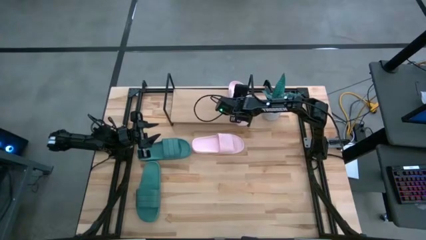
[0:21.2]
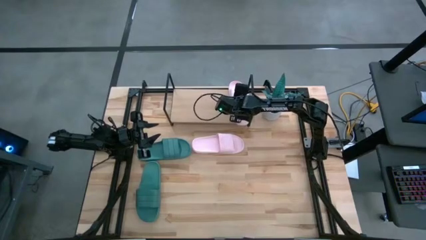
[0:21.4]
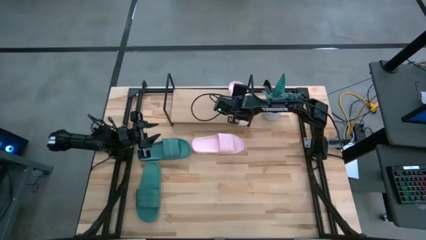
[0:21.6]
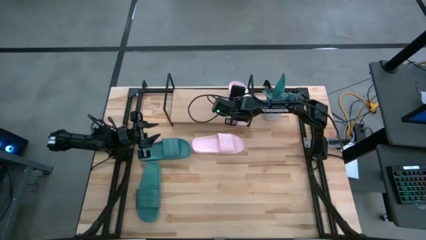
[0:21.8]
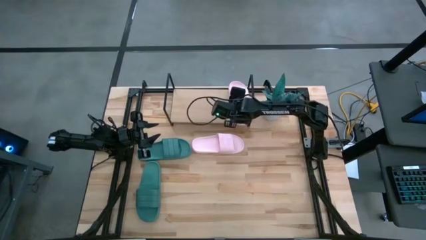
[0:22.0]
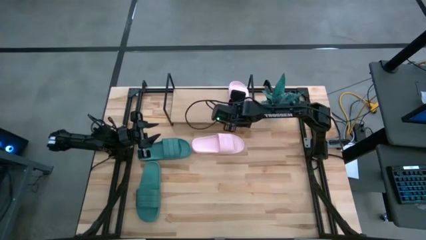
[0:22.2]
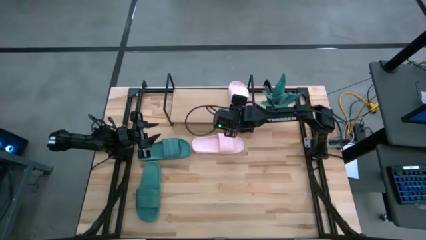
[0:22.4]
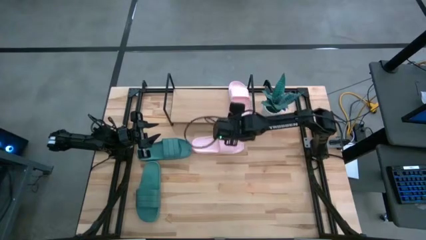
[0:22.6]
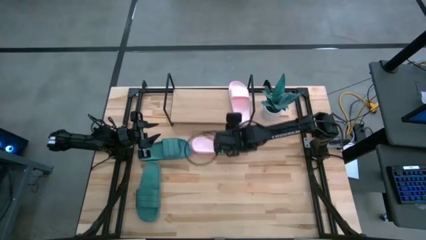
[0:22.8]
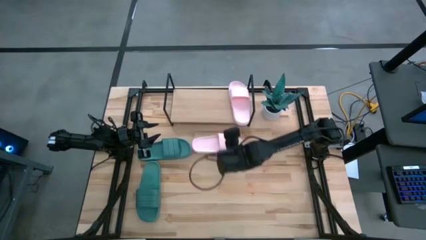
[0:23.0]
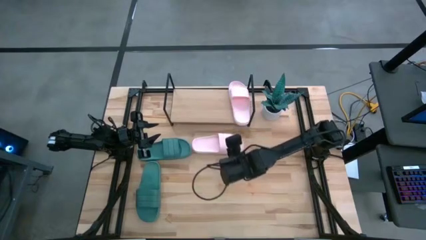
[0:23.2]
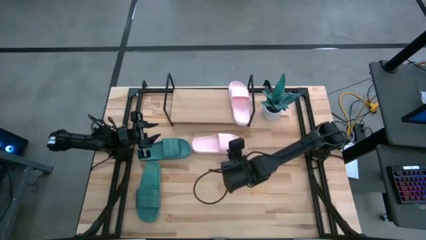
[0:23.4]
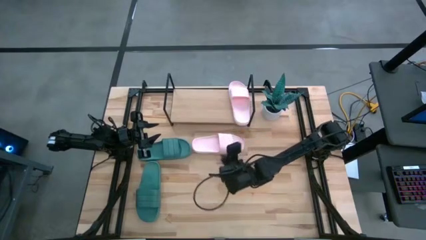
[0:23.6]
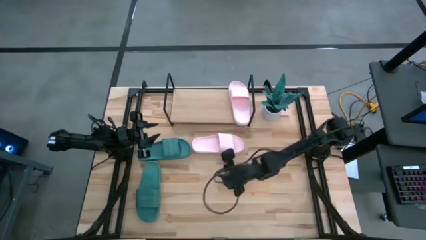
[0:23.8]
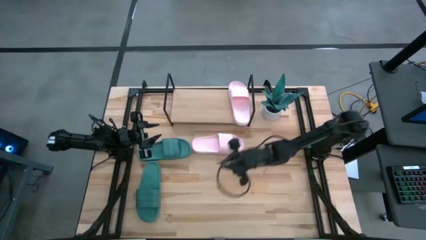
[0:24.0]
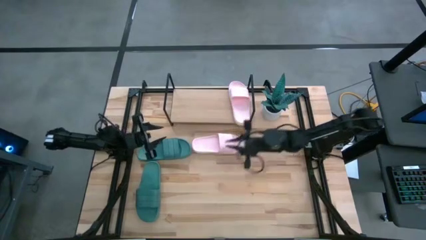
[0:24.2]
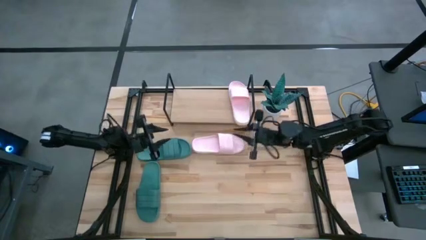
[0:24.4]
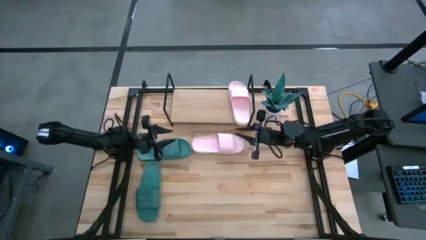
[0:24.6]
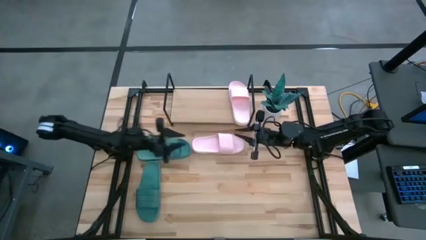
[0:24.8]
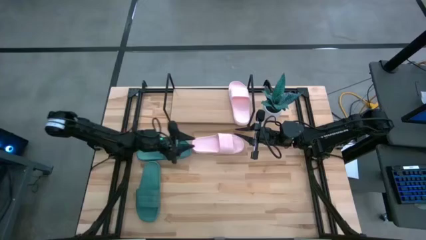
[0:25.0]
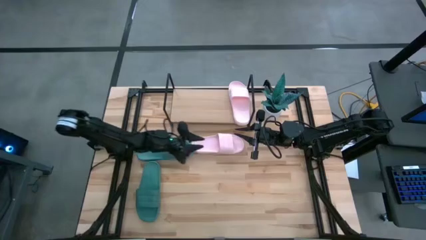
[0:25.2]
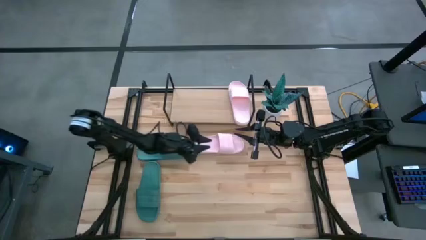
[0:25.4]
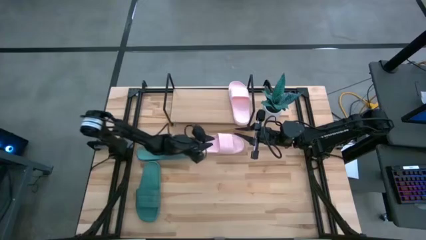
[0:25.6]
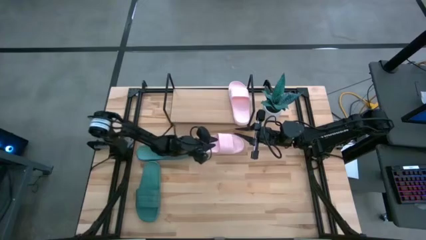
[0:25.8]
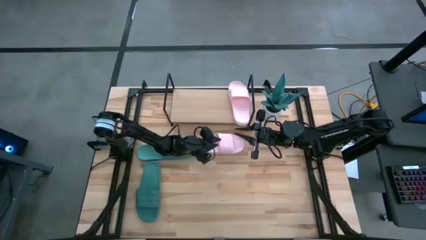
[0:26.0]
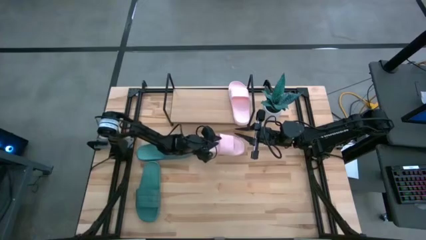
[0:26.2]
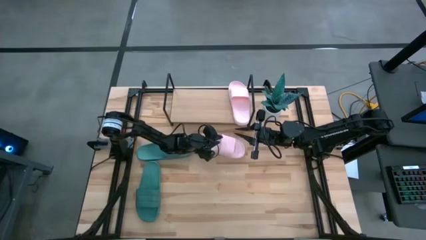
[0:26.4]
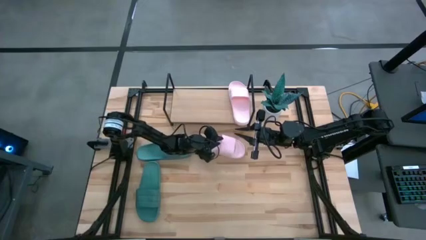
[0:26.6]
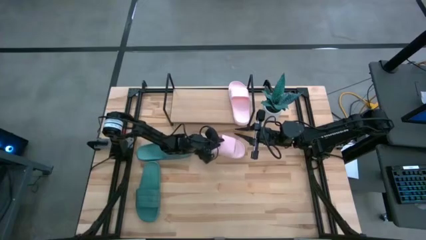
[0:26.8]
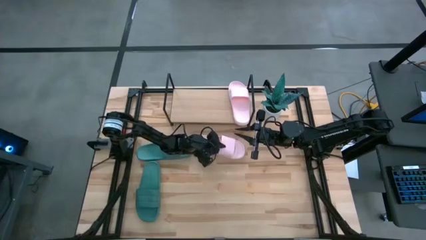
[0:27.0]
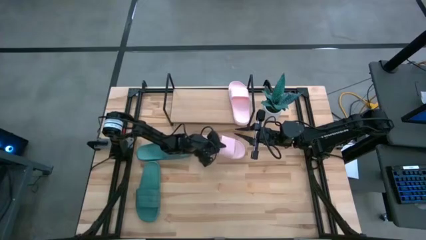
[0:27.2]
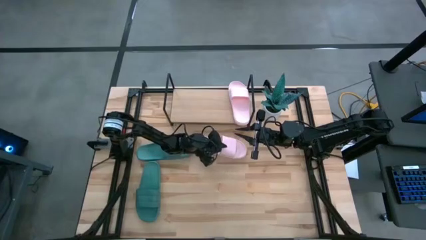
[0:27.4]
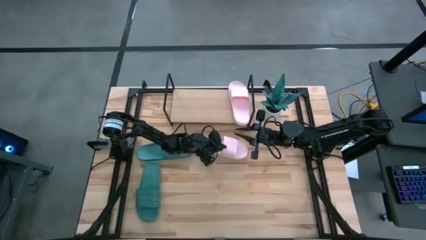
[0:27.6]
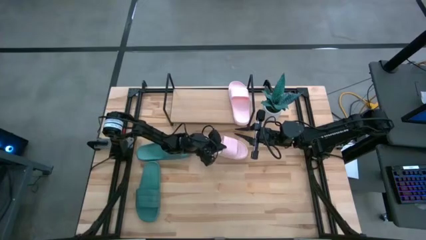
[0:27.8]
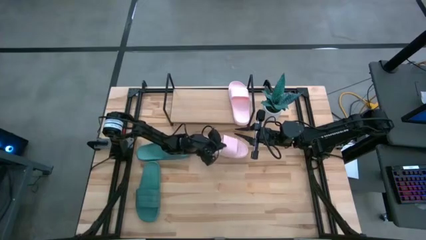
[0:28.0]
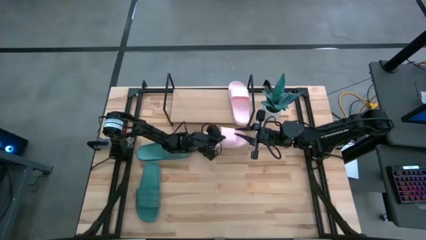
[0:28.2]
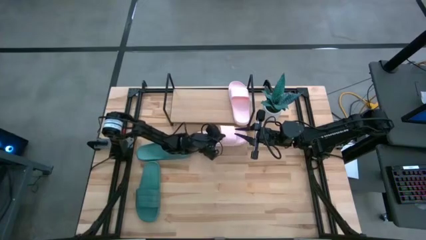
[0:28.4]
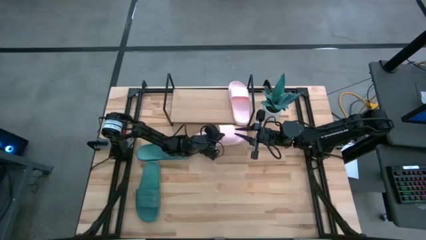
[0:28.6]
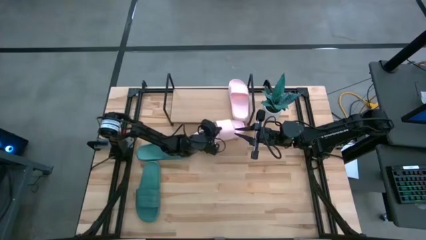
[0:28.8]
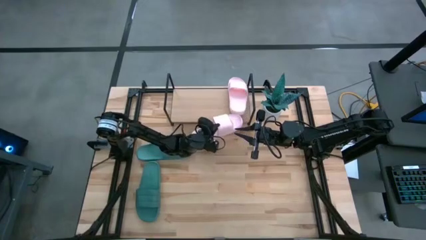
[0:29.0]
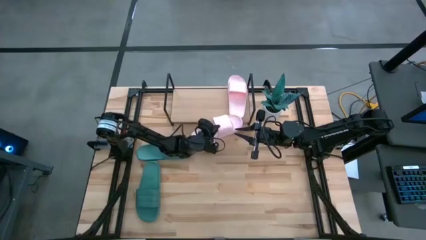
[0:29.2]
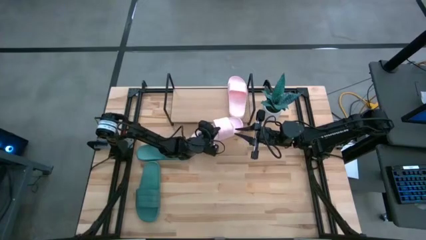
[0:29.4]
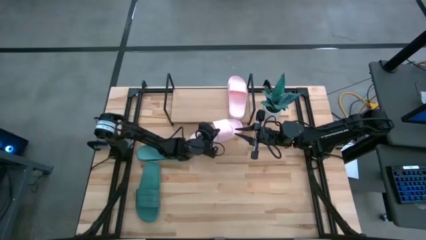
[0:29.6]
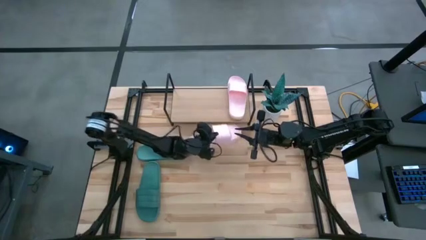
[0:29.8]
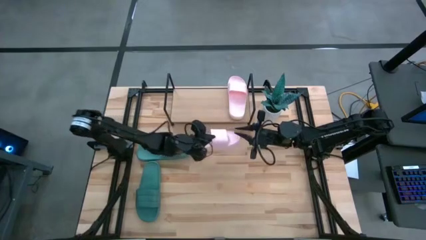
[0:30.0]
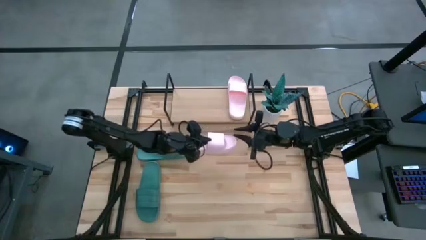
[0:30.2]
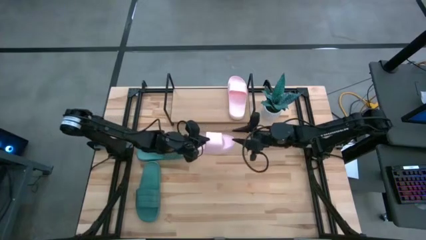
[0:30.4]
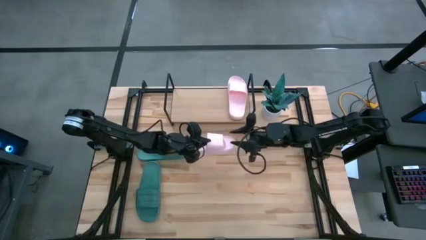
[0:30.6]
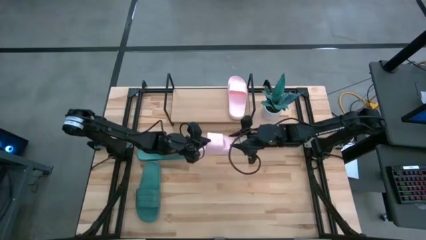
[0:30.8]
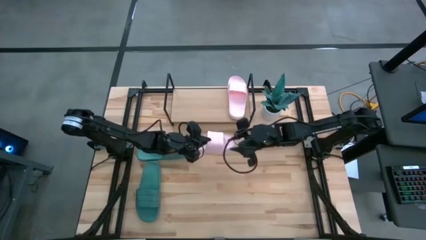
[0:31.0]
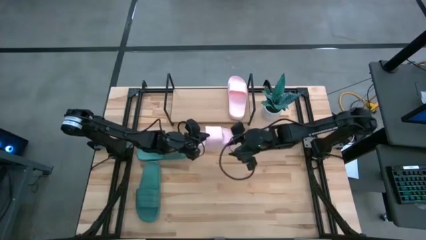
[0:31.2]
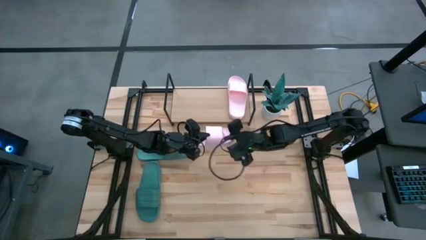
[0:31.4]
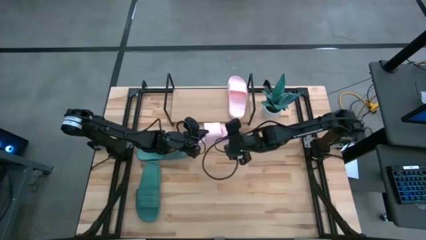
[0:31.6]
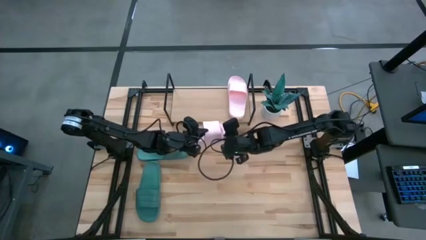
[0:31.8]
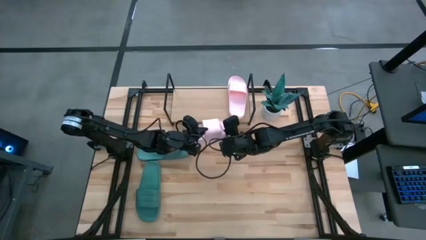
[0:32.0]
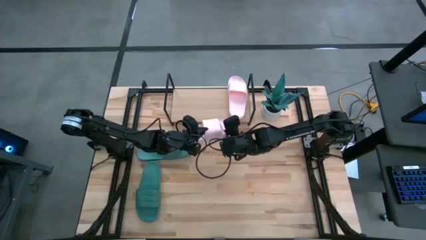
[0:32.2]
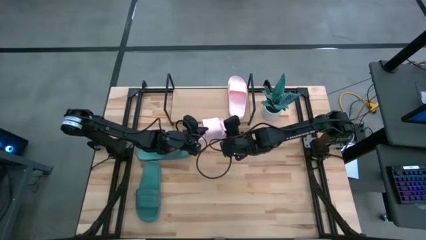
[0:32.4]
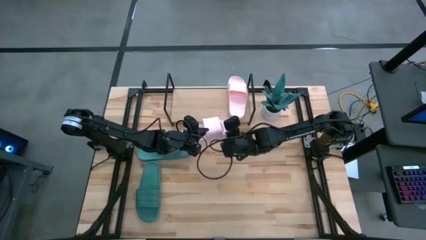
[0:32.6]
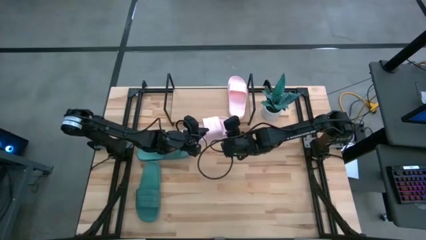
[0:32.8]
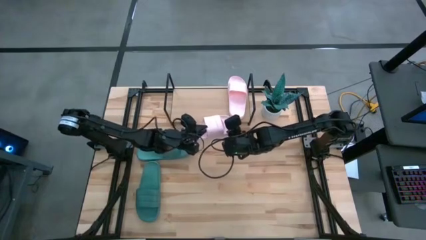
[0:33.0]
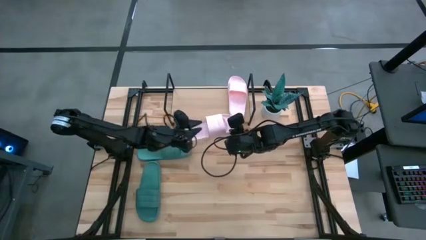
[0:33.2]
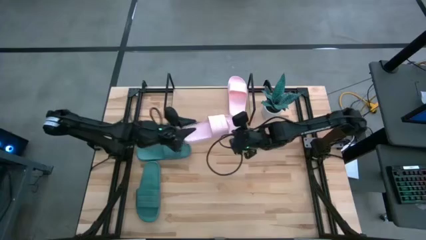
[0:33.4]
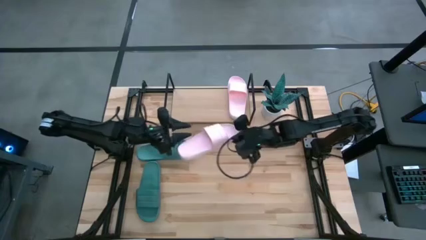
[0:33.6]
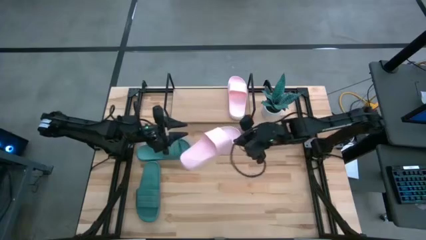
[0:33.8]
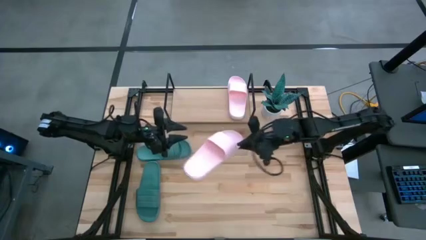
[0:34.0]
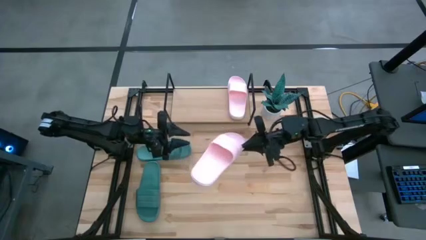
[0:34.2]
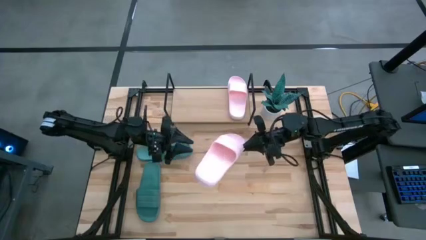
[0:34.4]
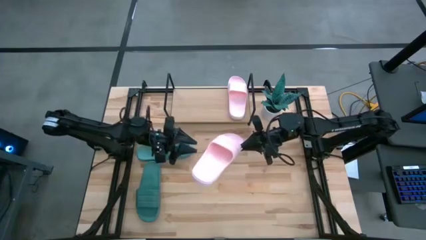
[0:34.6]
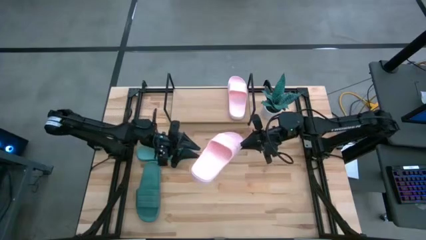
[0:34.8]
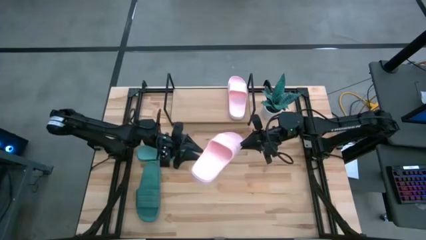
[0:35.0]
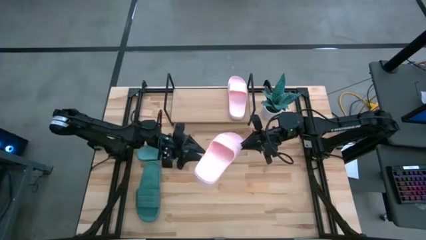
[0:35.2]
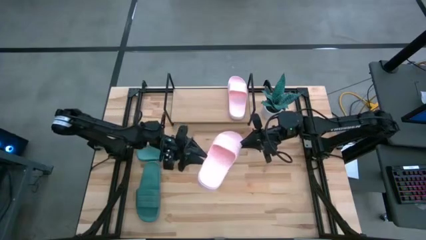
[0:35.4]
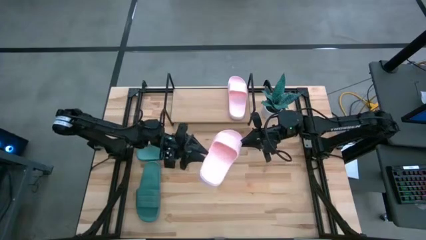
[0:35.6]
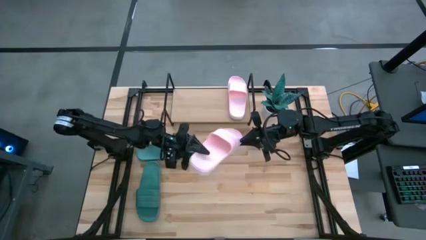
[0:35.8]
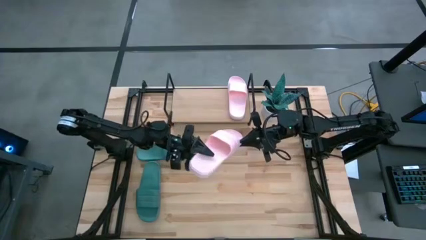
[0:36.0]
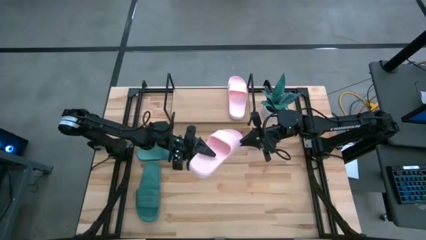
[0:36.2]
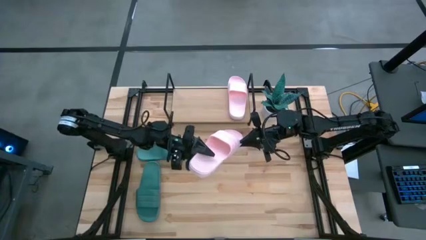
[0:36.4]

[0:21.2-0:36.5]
Task: Pick and place slides into the shelf
Put the pink slipper on the shelf
